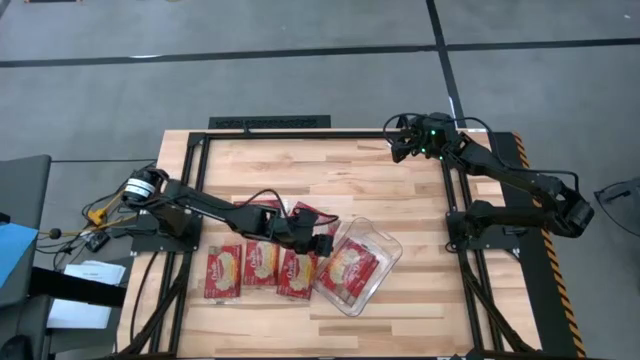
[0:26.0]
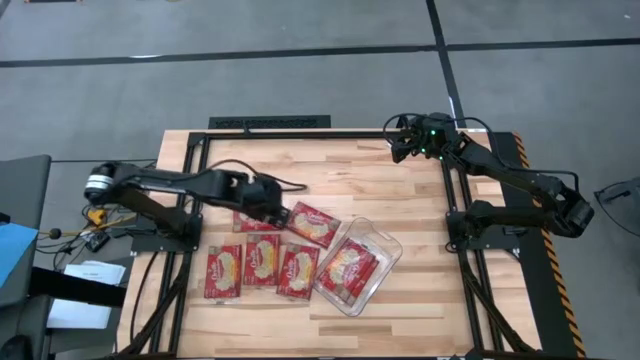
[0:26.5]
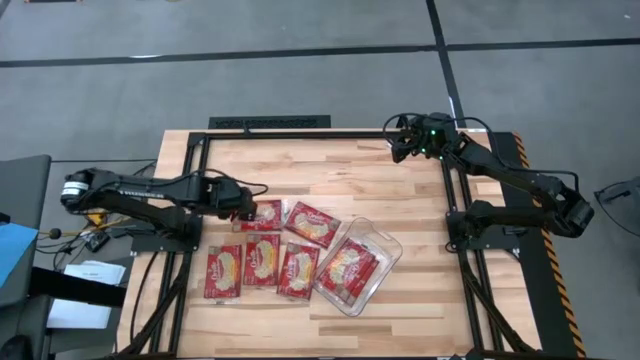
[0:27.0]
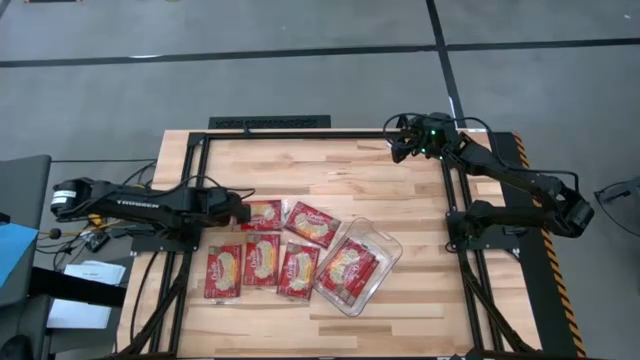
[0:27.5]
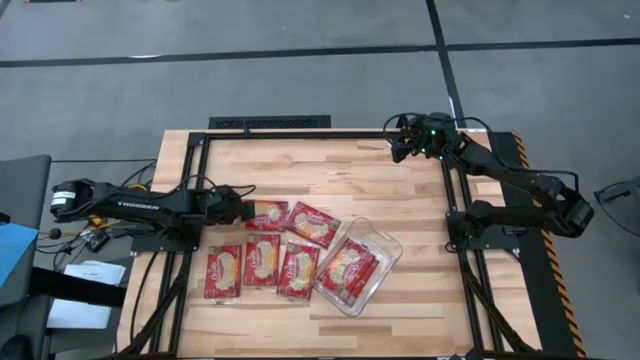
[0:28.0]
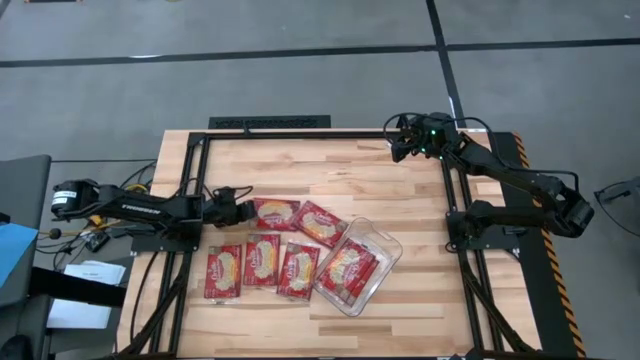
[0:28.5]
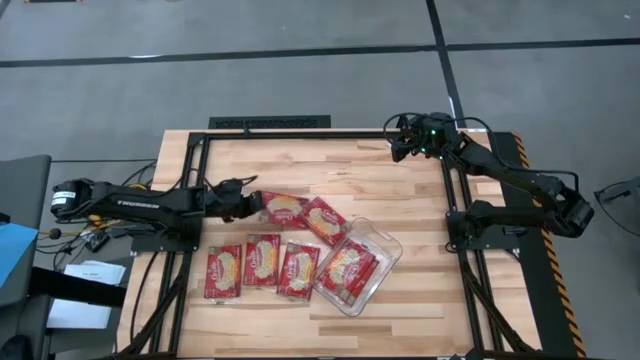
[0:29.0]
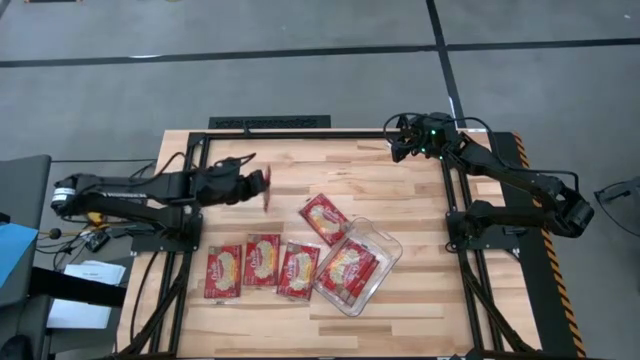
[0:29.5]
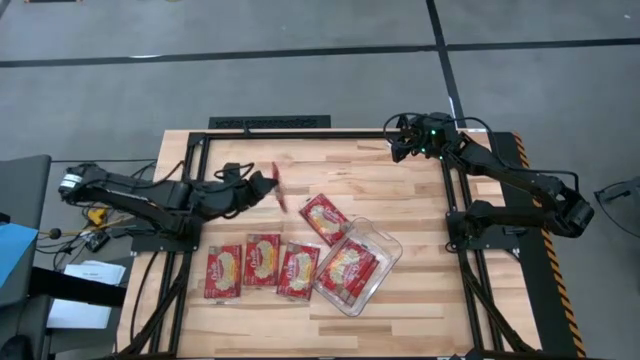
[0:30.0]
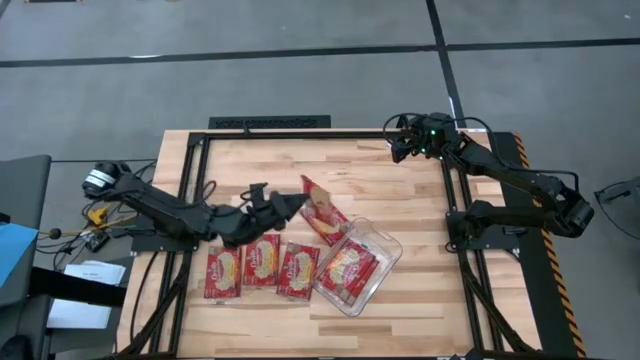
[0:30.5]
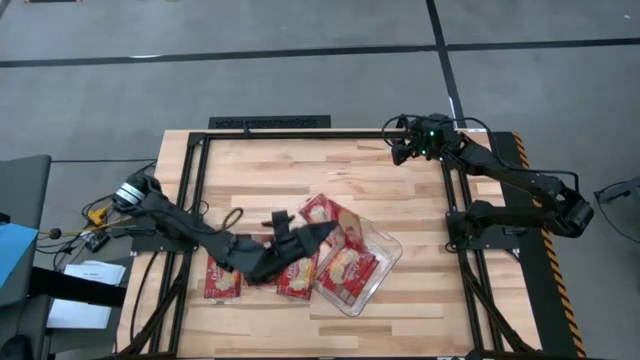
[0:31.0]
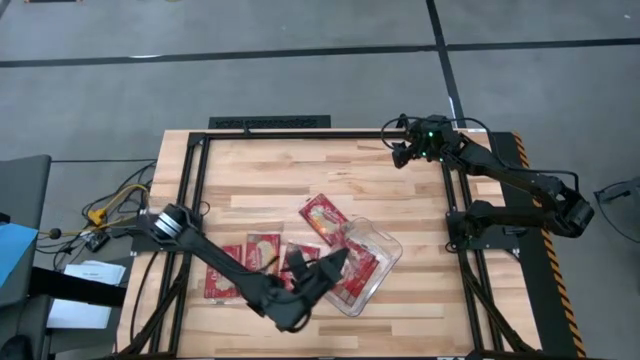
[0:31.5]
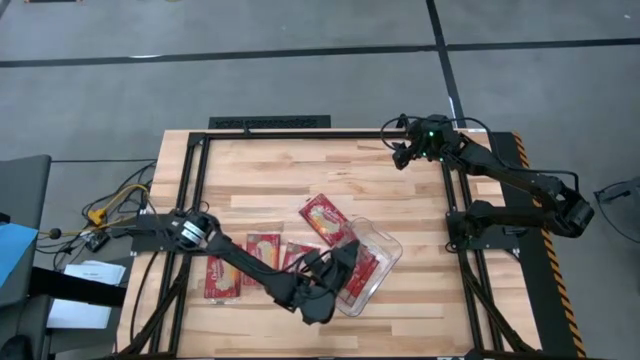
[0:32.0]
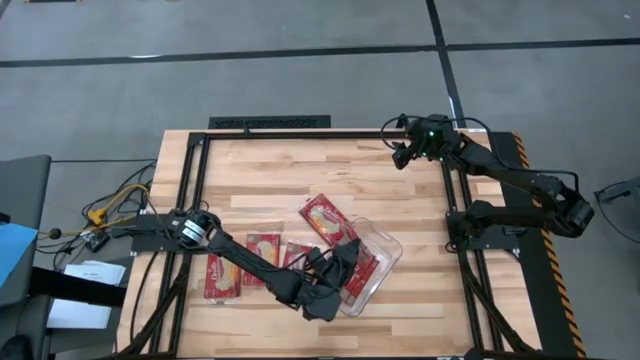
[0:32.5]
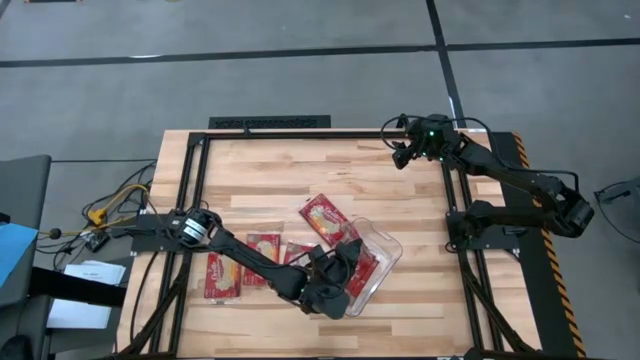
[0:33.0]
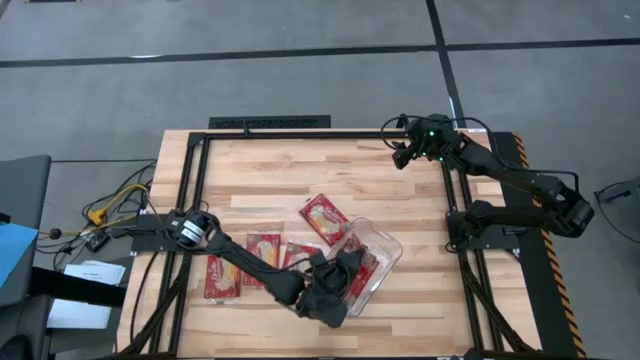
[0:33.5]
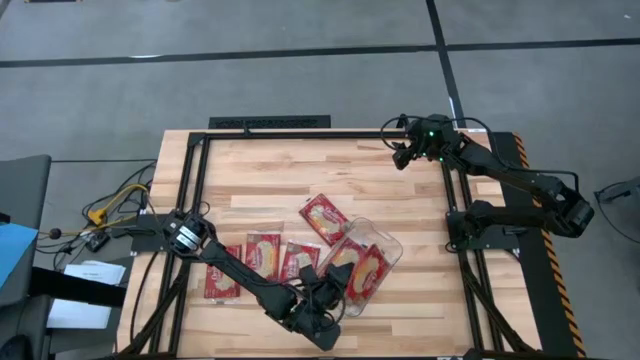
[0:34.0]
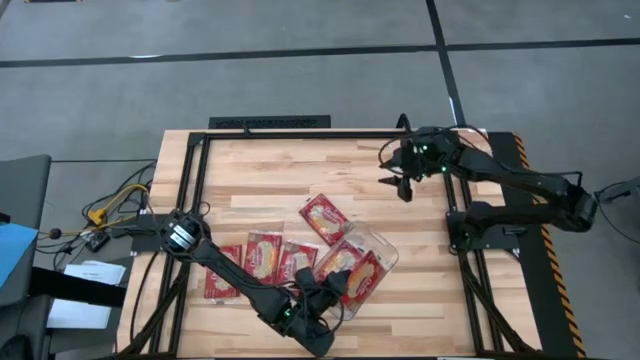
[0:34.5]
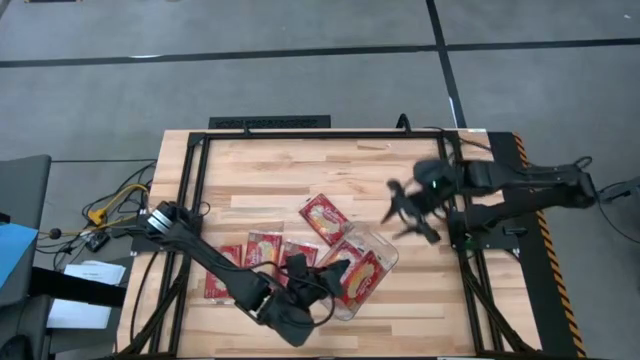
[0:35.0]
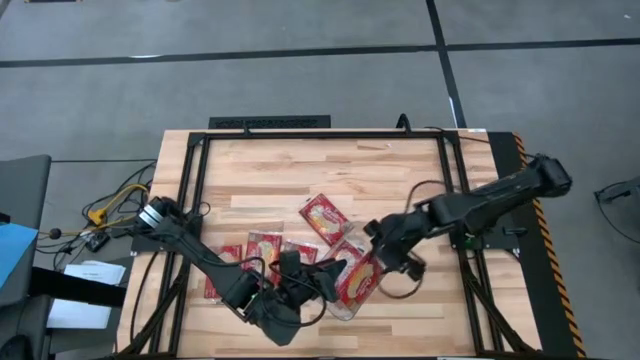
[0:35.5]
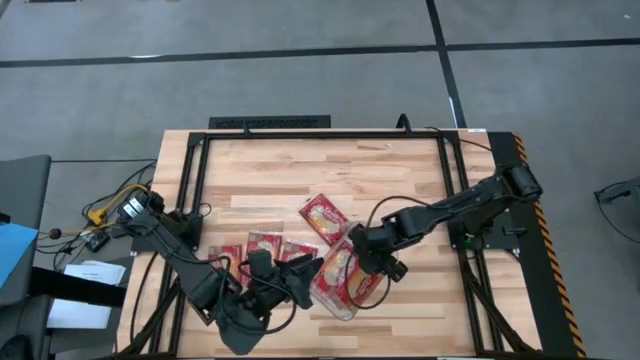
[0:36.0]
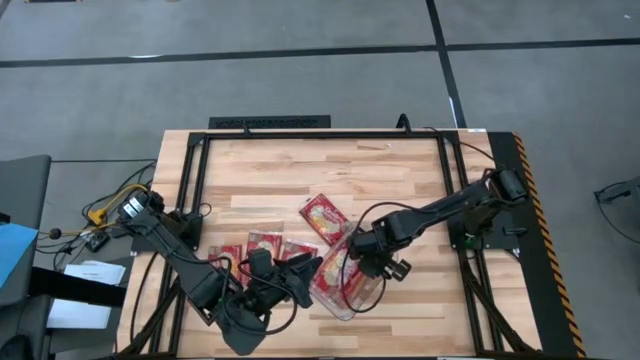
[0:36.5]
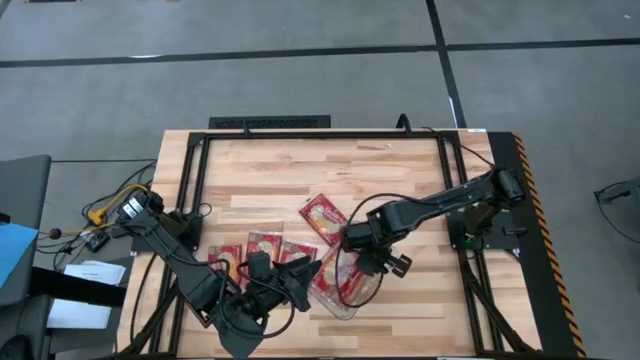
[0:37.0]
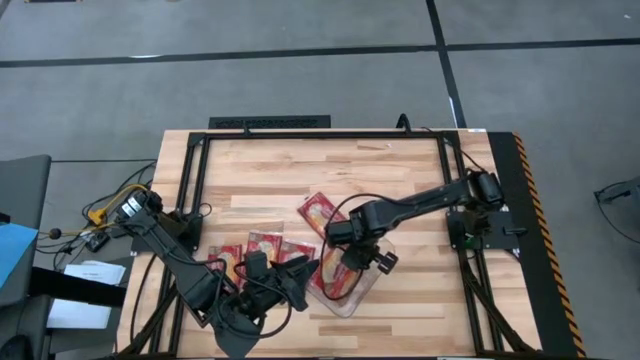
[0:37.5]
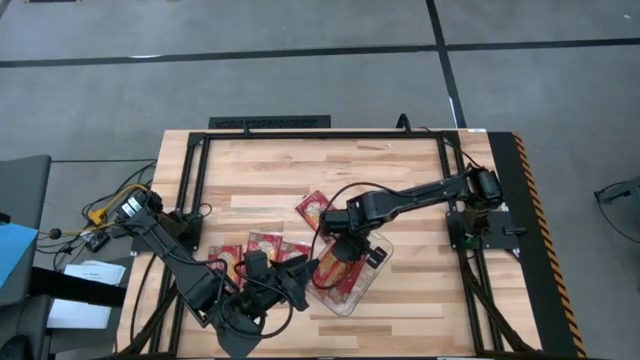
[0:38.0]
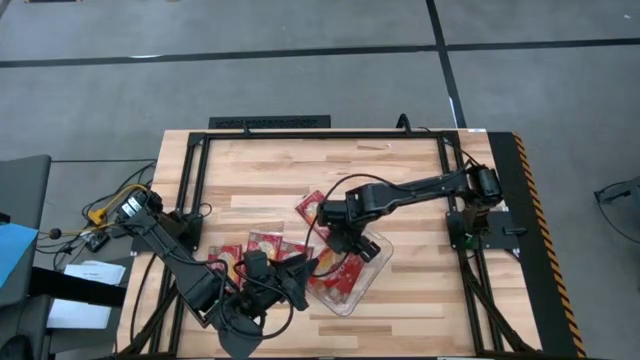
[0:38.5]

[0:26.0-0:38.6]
Task: Sort popcorn bags into baskets
Put the red popcorn packet into the transparent bin

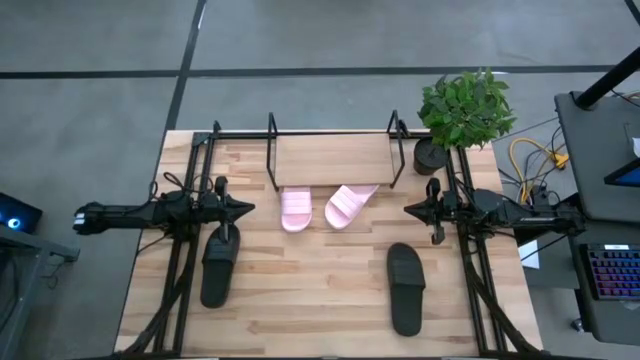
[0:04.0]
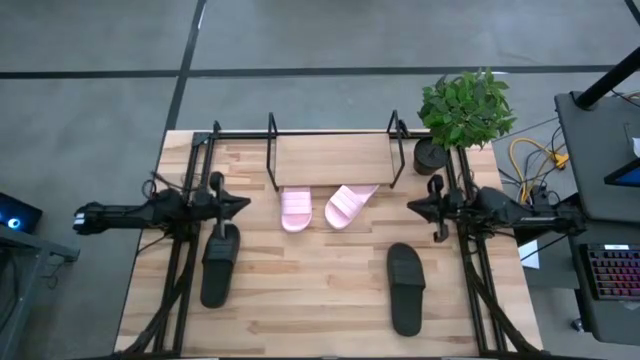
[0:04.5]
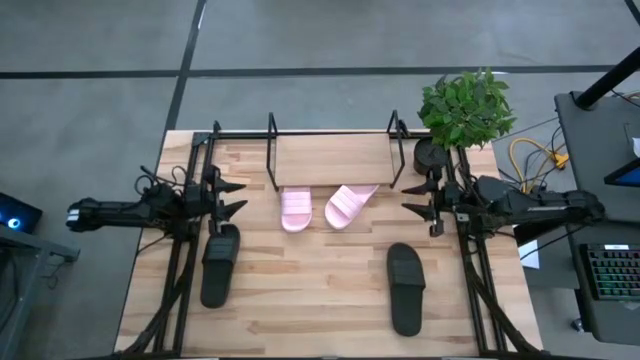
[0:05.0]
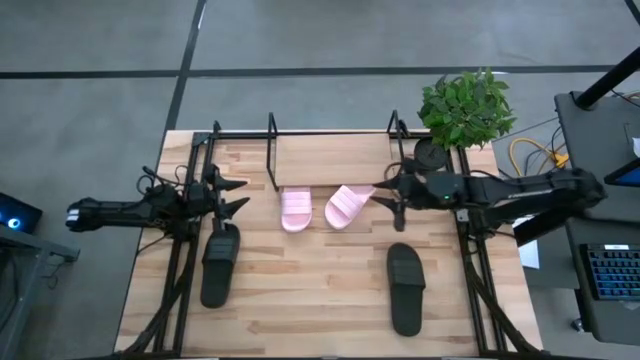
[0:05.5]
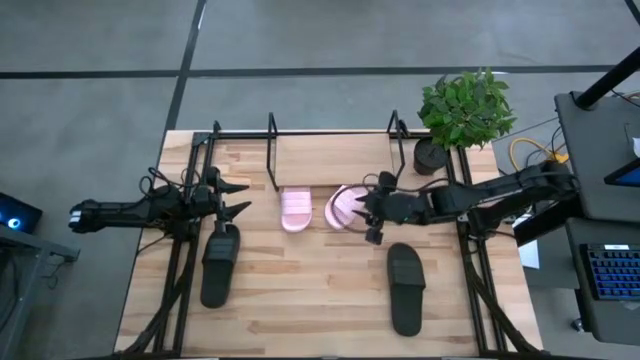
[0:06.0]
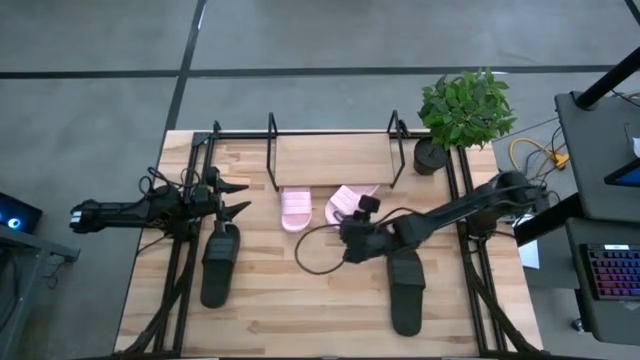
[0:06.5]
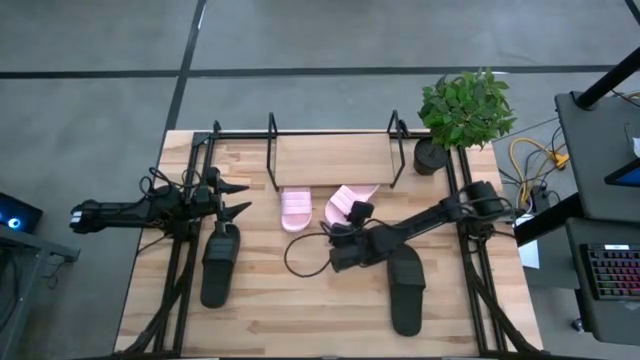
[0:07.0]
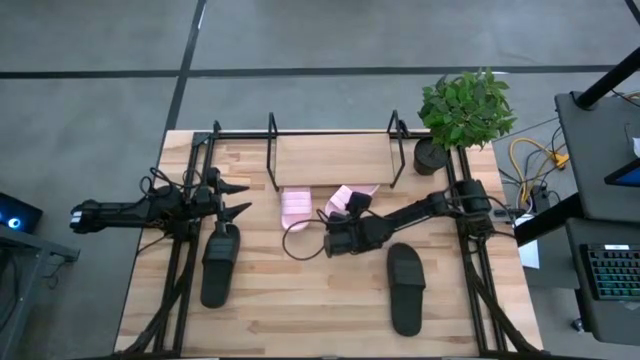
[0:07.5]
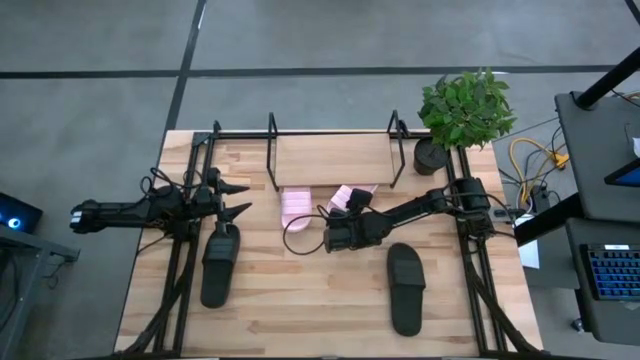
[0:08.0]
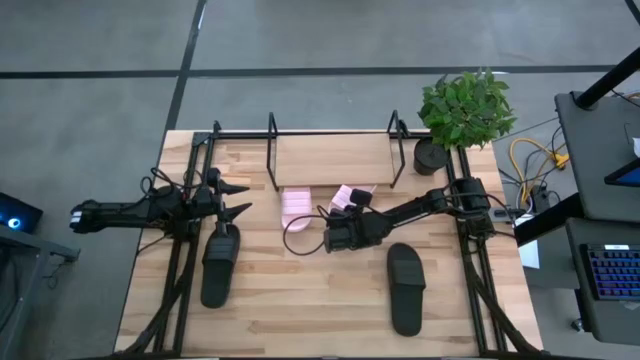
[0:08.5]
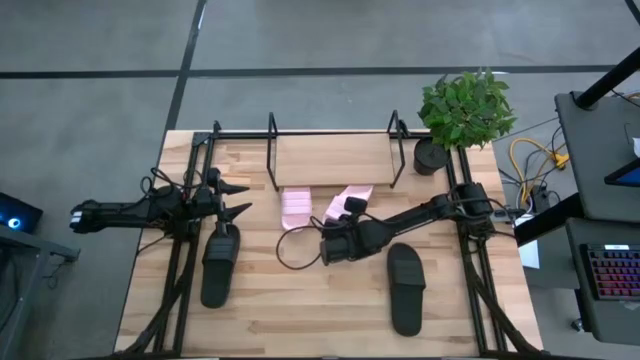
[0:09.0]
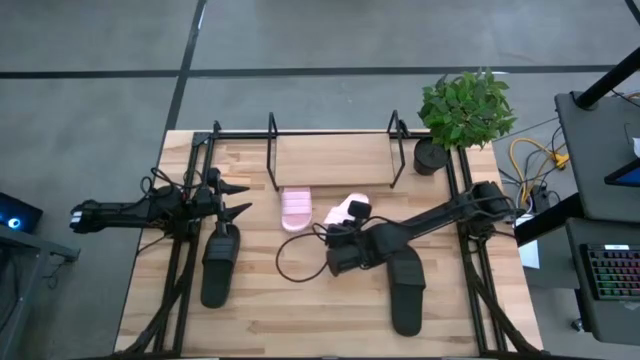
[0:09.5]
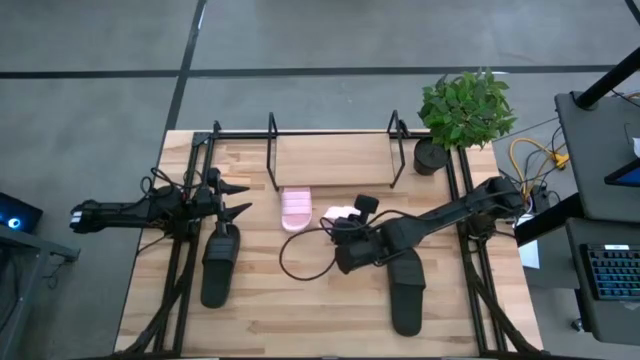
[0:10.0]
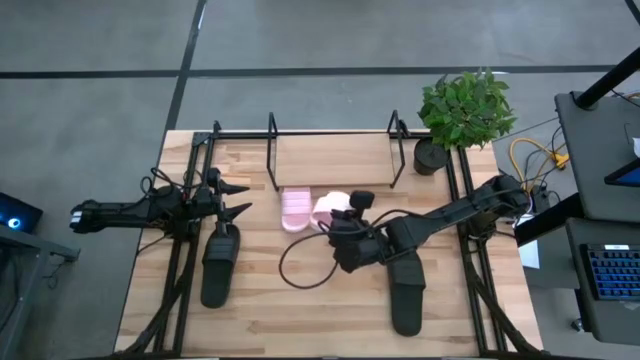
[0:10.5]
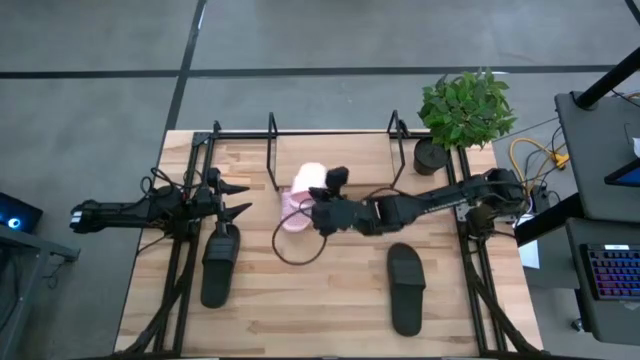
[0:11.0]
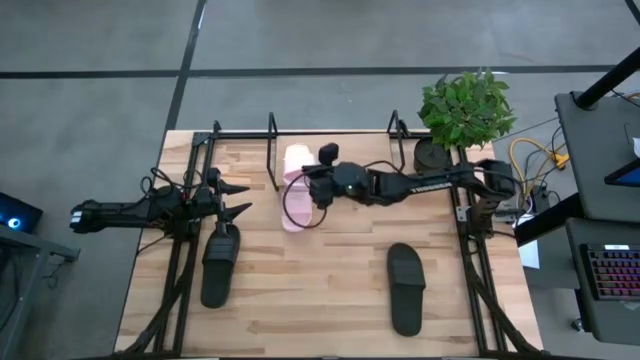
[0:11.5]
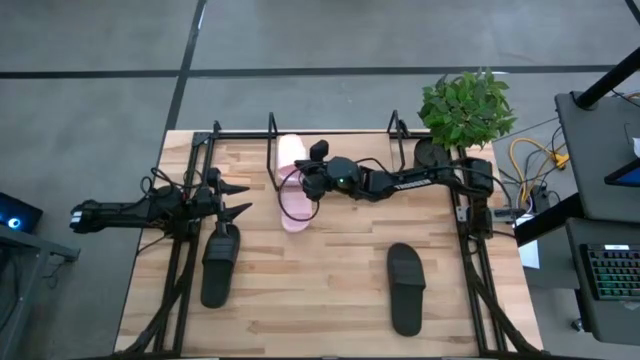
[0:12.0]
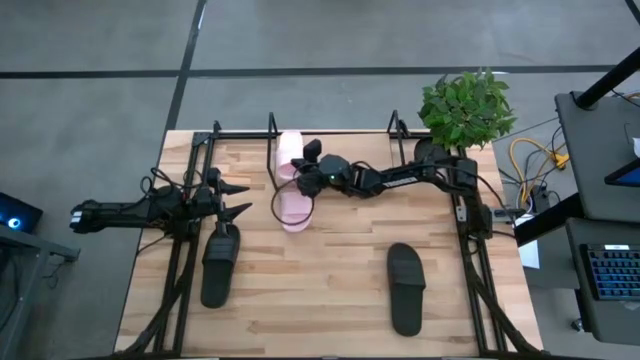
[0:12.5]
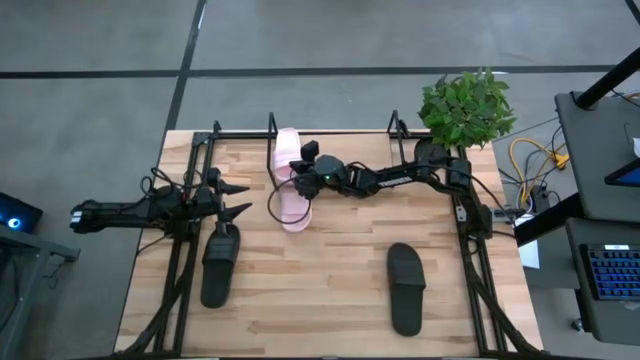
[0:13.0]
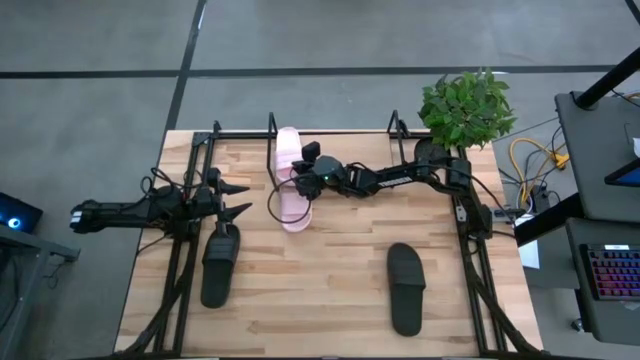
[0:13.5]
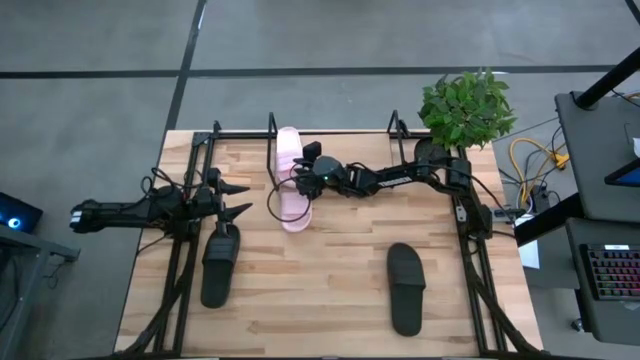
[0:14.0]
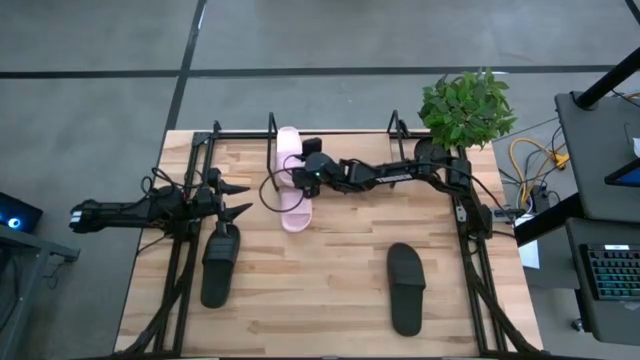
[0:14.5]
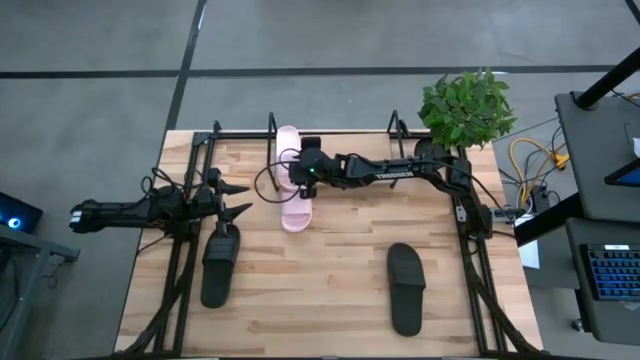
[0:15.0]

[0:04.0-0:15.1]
Task: Pick and place slides into the shelf
Put the right pink slides on the shelf
